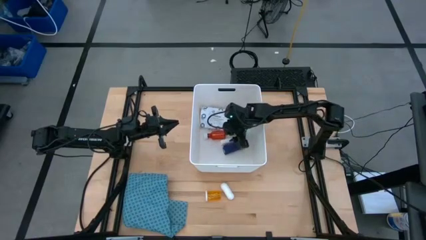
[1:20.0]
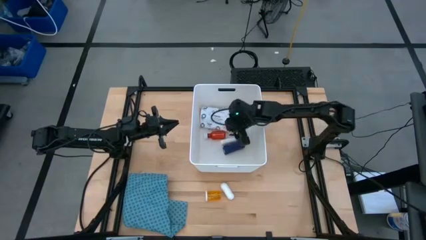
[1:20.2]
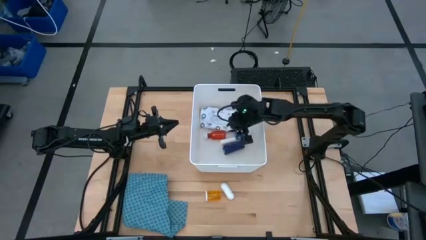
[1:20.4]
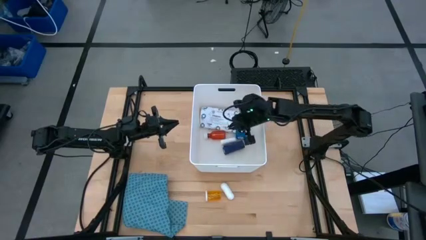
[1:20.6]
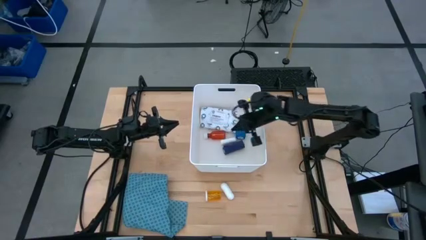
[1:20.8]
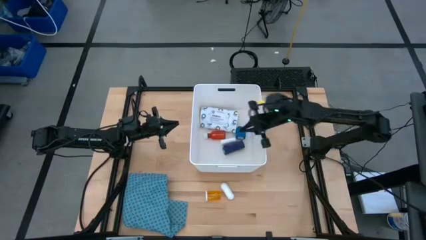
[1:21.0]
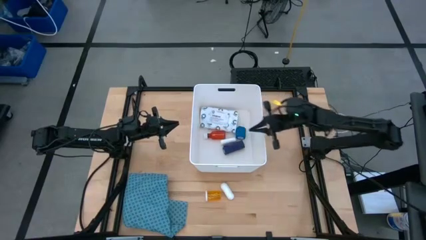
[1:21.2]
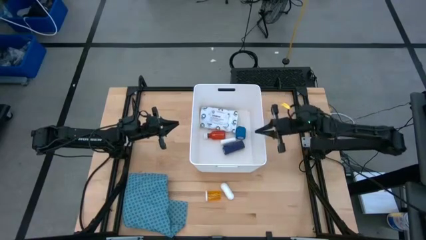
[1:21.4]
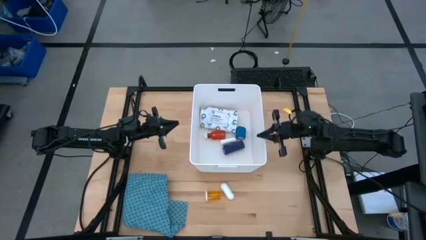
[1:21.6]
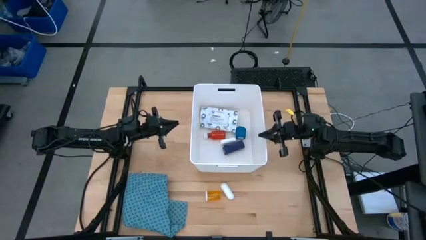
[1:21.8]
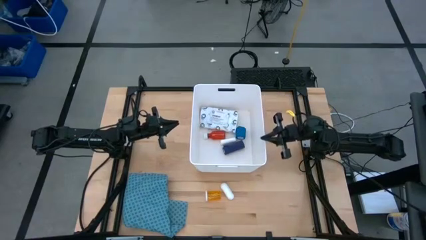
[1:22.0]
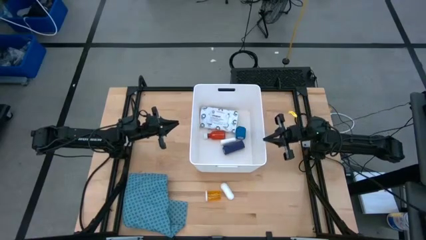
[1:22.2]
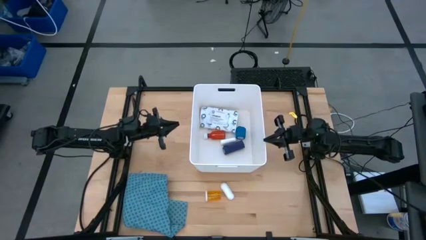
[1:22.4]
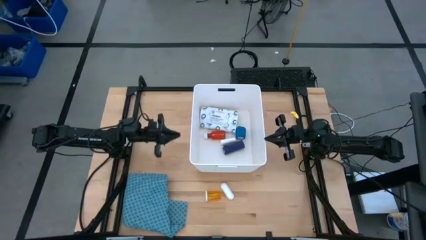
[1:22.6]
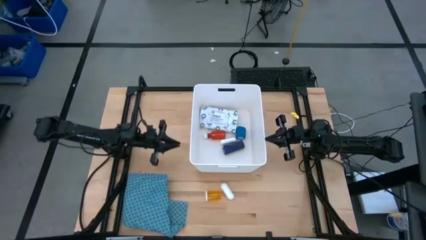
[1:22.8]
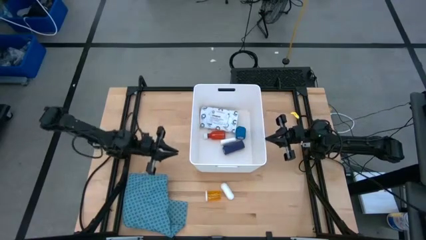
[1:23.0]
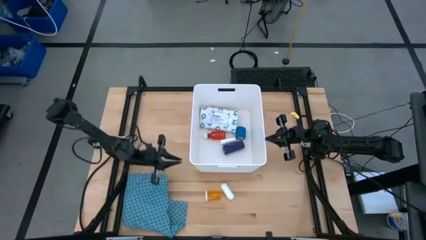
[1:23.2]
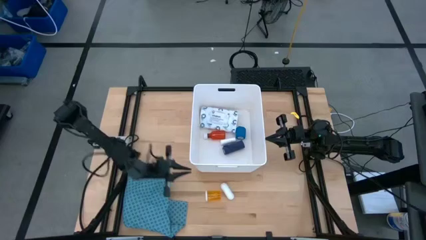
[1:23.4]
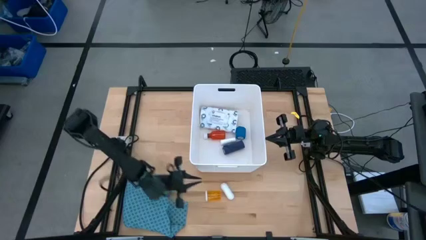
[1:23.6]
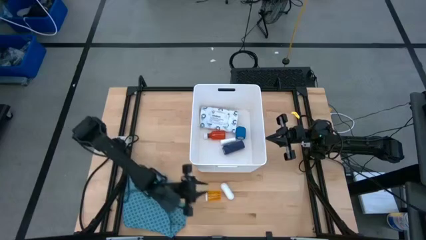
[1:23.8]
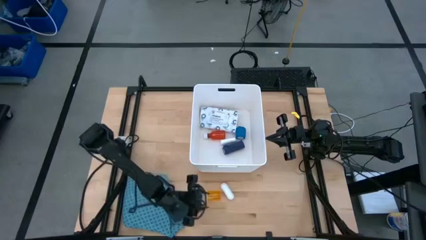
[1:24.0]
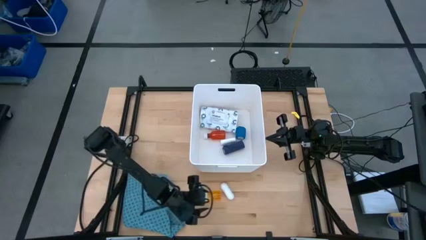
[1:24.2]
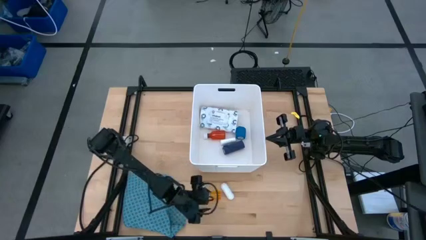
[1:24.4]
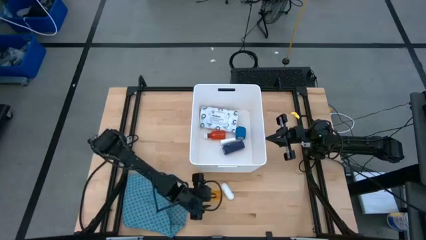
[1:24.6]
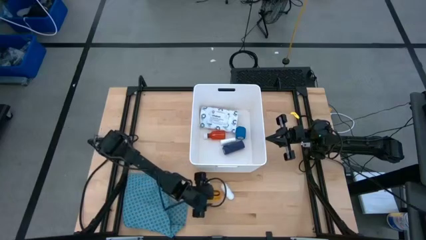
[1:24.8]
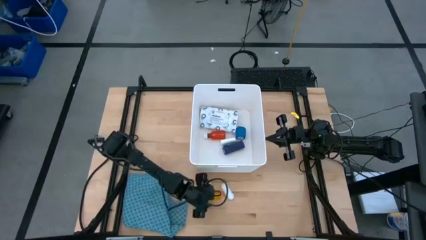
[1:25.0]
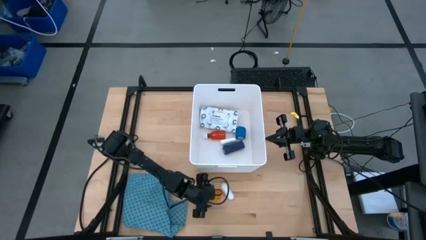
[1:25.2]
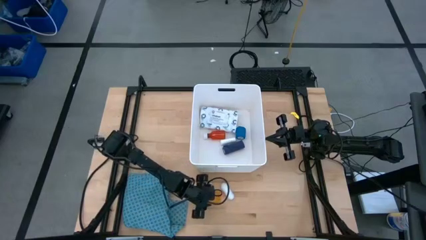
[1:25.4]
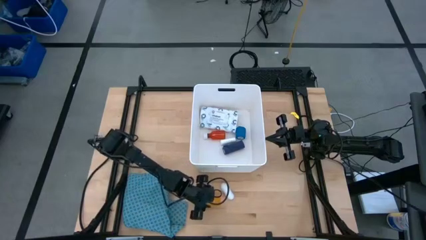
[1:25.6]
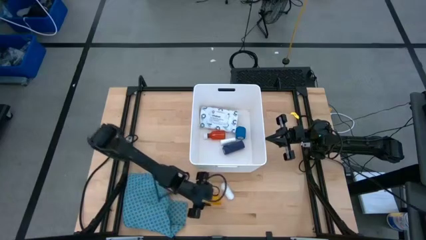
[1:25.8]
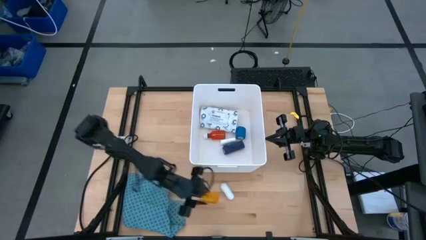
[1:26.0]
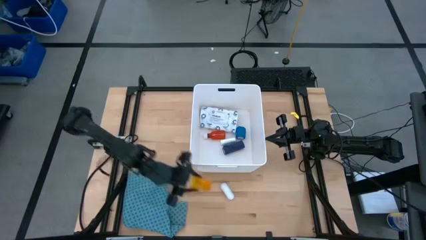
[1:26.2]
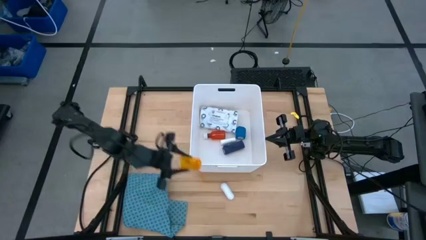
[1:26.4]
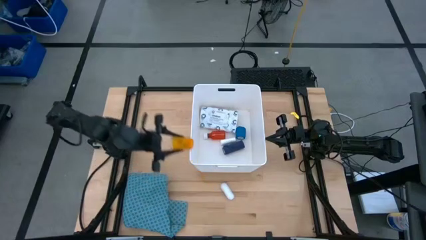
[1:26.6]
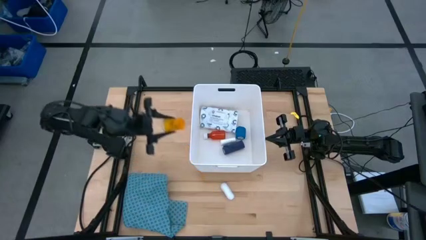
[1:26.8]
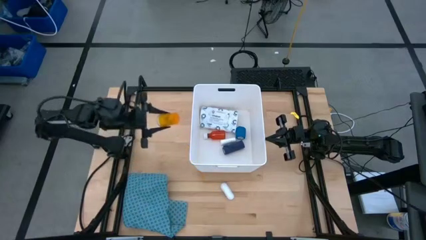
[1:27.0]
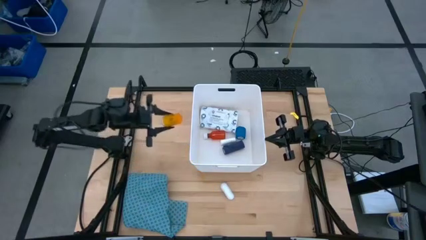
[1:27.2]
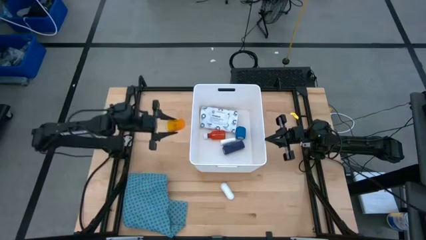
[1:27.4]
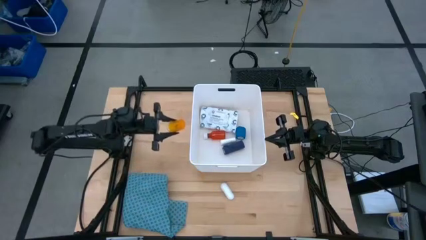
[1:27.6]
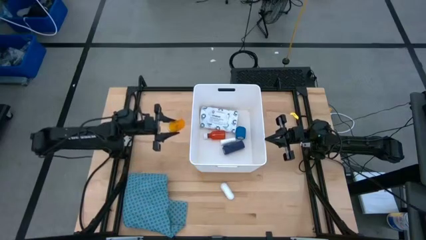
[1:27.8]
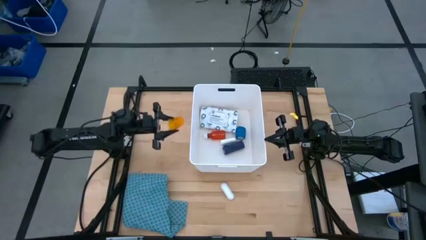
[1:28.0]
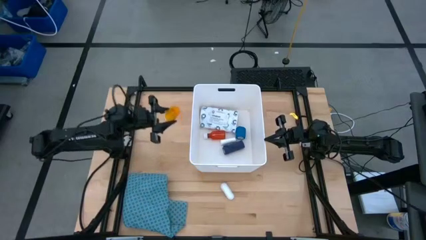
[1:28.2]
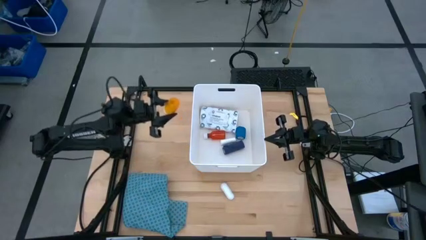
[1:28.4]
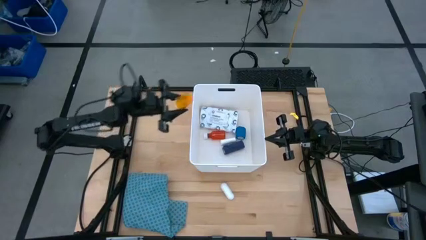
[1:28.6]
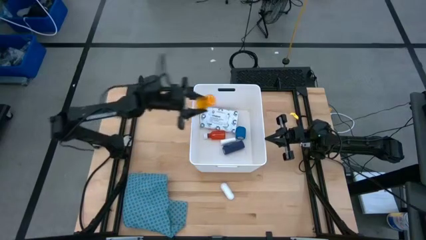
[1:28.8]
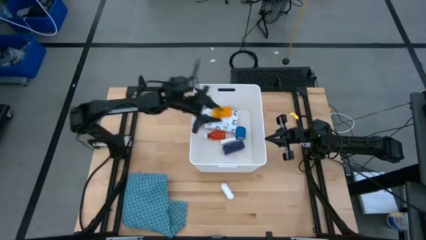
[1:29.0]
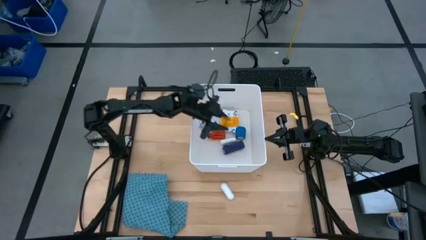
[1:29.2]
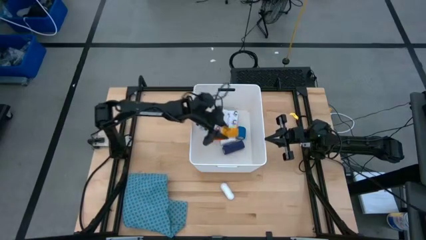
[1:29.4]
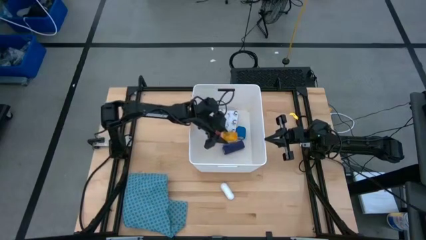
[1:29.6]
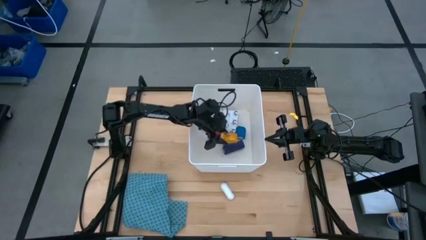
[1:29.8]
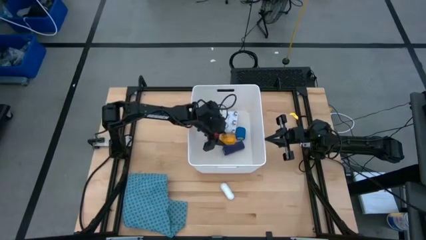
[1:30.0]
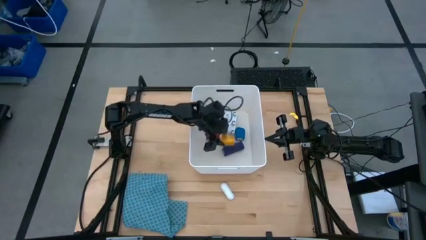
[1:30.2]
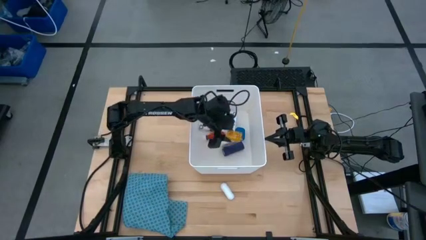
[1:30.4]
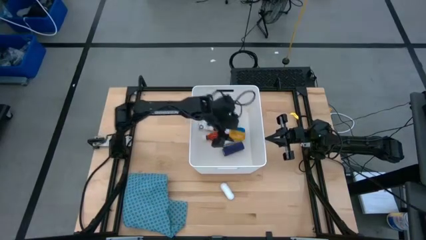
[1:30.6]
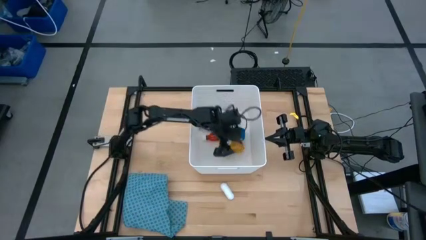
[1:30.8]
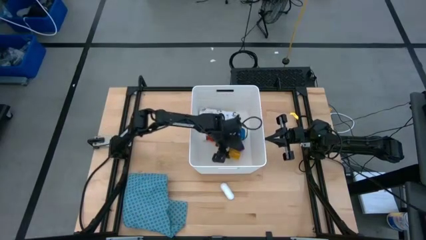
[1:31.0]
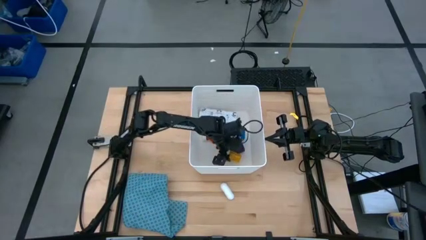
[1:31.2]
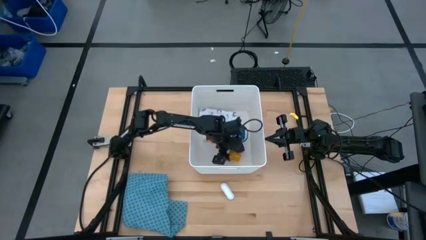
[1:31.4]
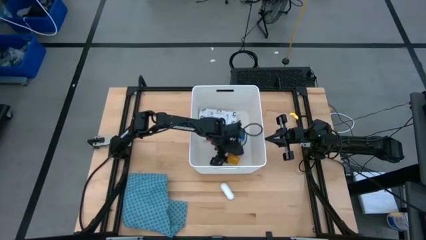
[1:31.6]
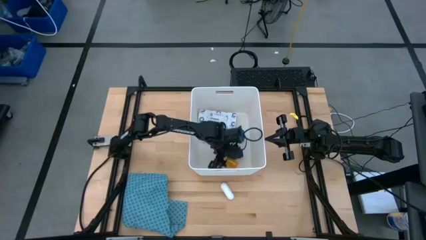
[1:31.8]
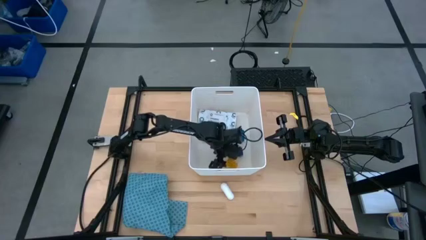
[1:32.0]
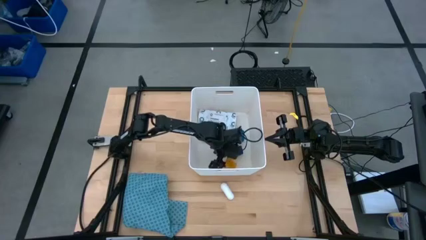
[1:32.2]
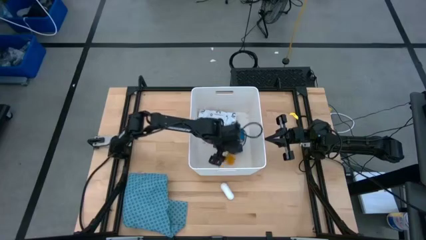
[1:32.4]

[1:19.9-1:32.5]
Task: Pick & place medical supplies in basket/bin
Put the orange pill bottle into the white bin

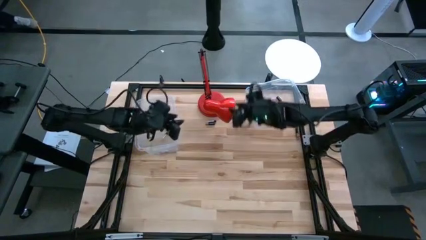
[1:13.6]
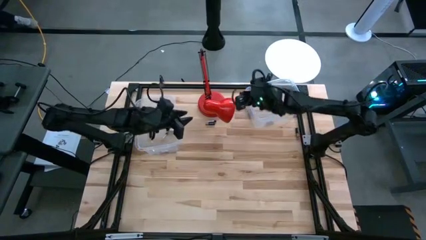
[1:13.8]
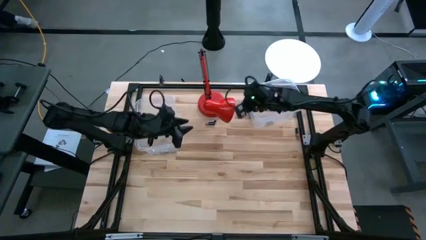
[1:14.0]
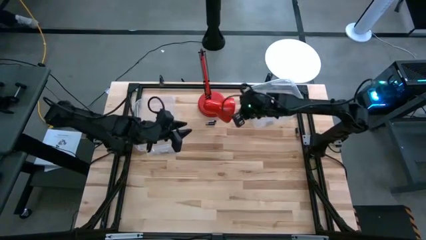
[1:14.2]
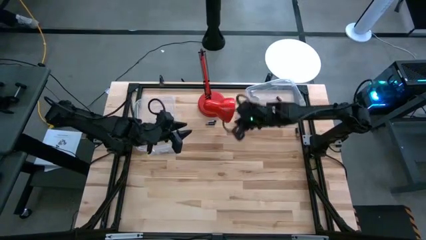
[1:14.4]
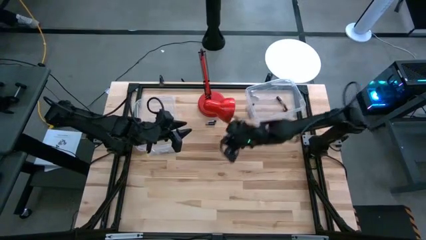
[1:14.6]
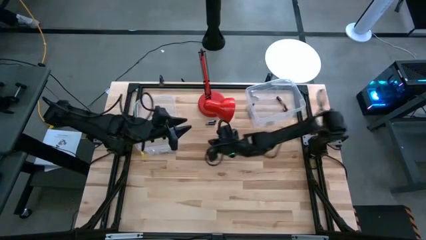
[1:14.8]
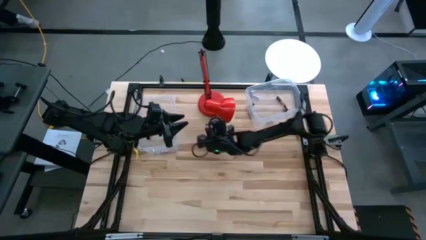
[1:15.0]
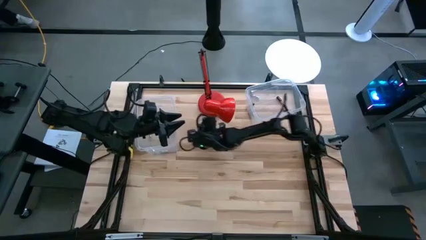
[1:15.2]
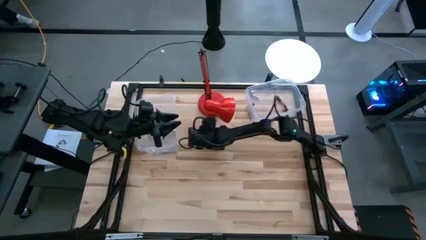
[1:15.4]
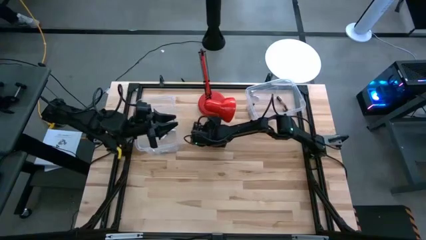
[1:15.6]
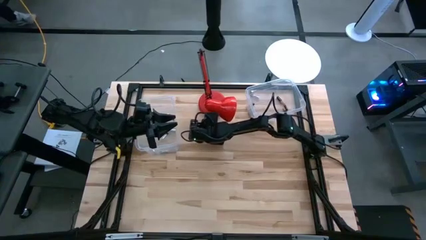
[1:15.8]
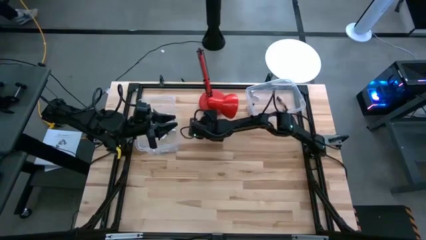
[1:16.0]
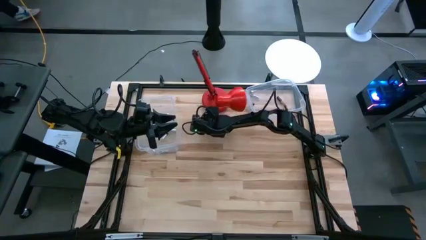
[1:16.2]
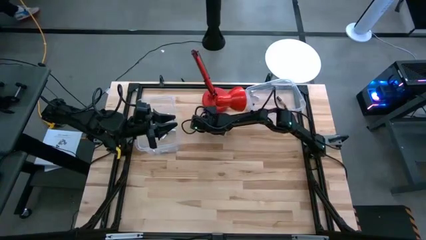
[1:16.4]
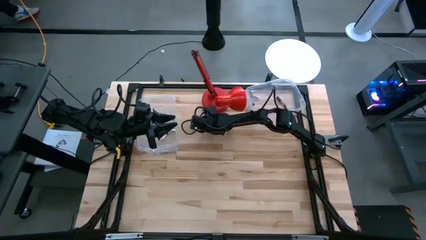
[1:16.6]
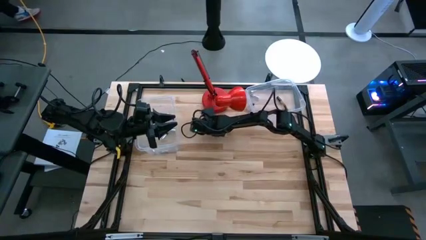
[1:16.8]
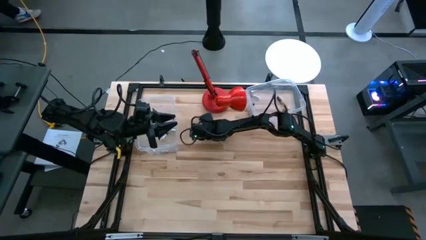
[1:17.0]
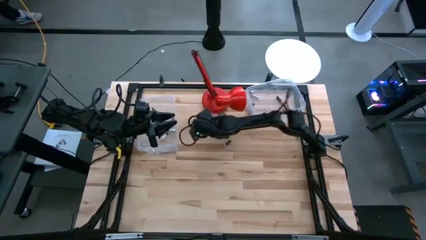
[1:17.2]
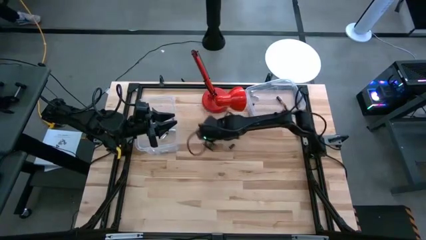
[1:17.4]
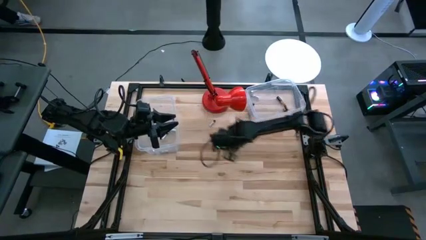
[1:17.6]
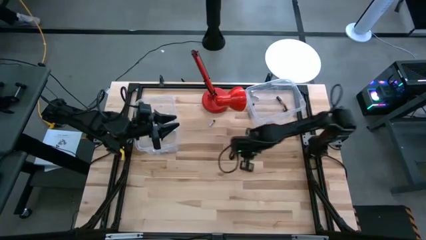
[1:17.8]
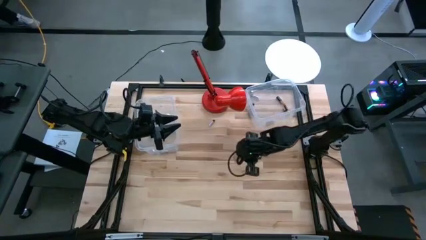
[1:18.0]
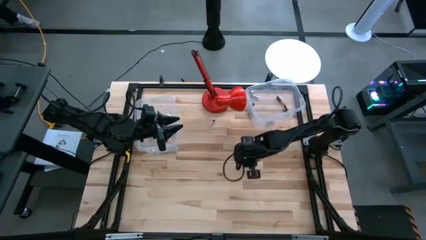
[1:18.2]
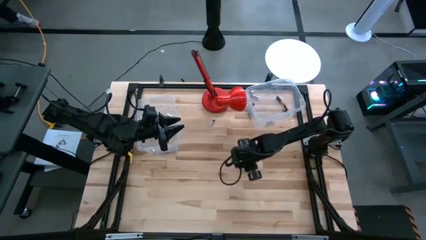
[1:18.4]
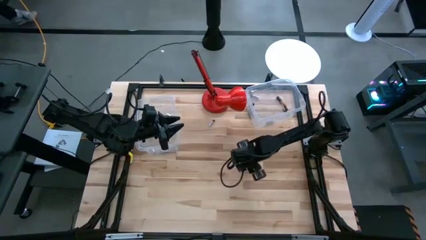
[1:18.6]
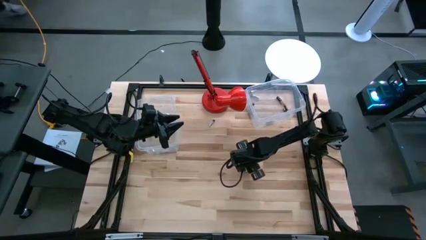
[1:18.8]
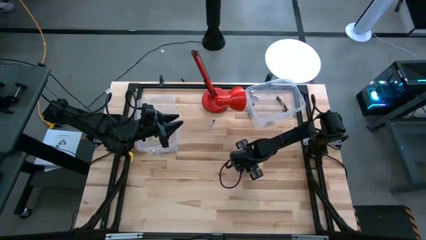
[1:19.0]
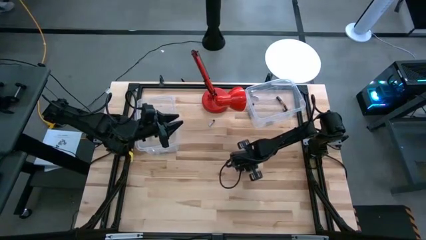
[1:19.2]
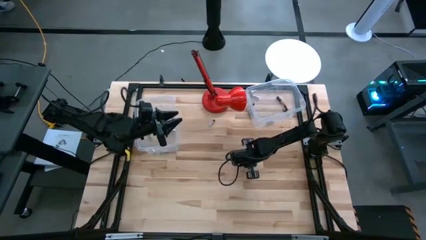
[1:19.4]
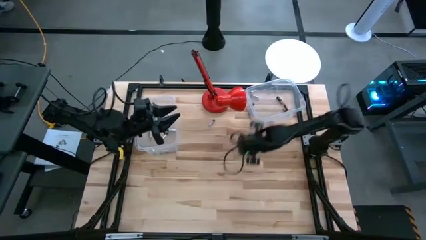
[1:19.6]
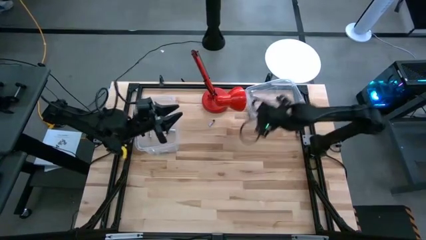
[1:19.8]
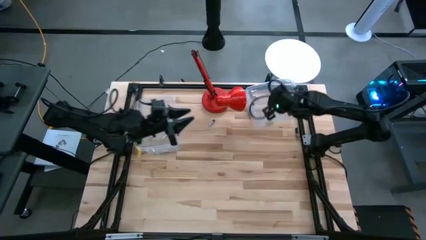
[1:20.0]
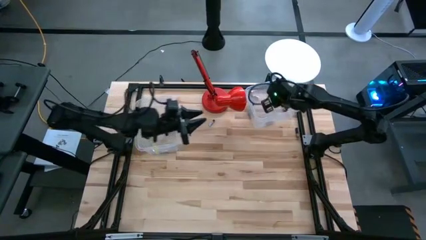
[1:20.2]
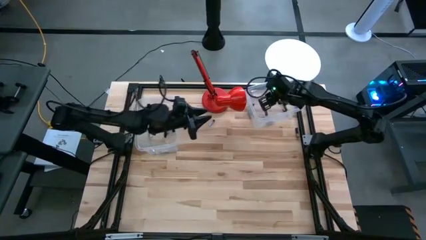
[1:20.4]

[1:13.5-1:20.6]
Task: Sort batteries
Put the black battery into the top transparent bin
